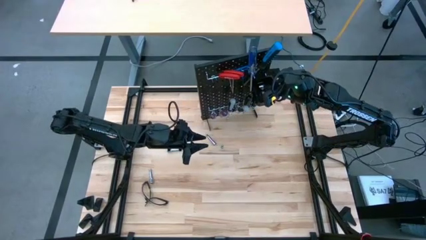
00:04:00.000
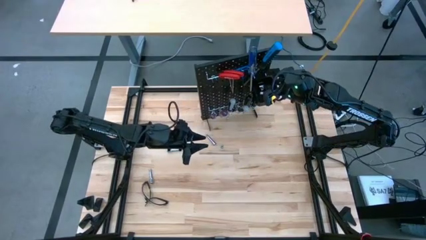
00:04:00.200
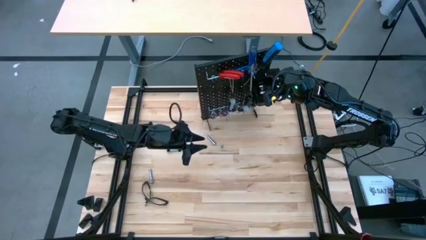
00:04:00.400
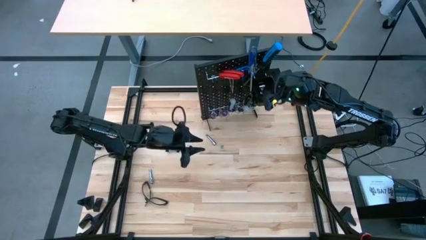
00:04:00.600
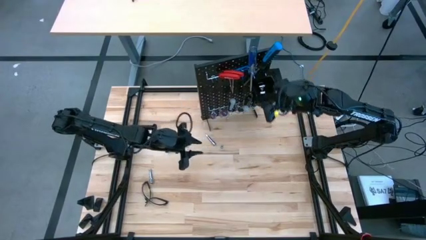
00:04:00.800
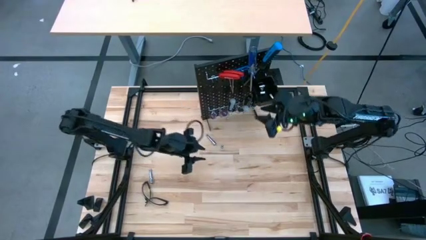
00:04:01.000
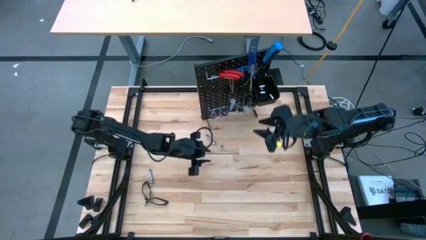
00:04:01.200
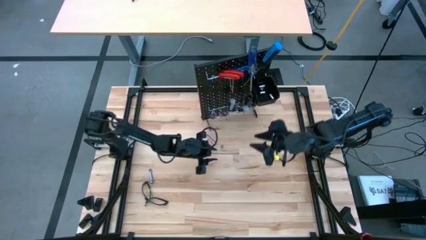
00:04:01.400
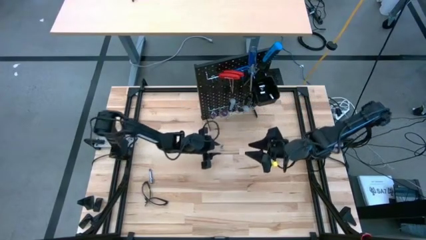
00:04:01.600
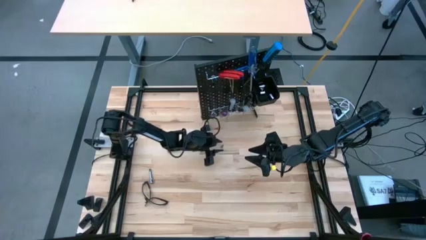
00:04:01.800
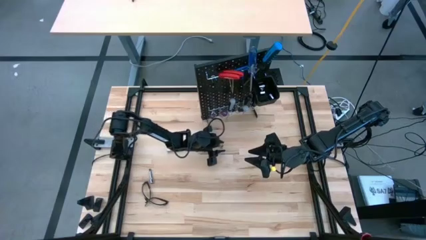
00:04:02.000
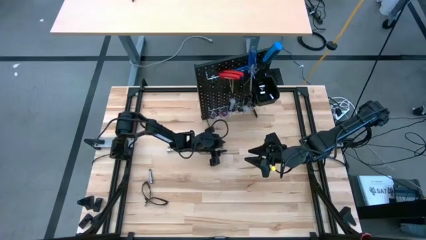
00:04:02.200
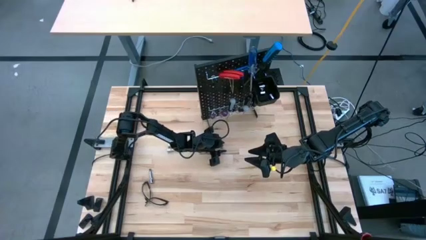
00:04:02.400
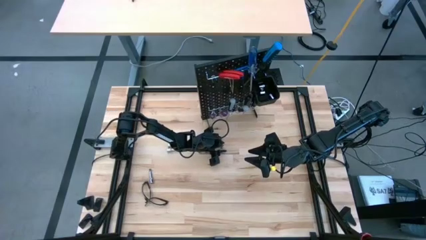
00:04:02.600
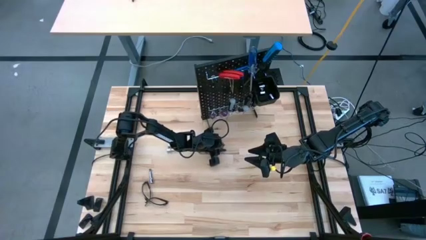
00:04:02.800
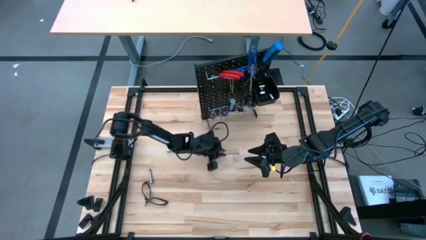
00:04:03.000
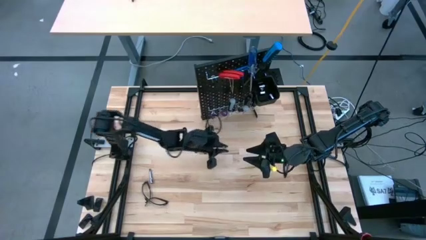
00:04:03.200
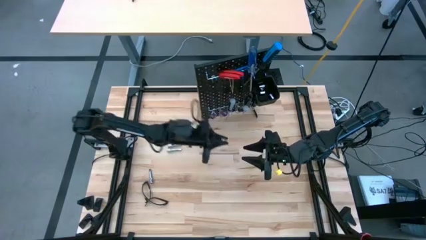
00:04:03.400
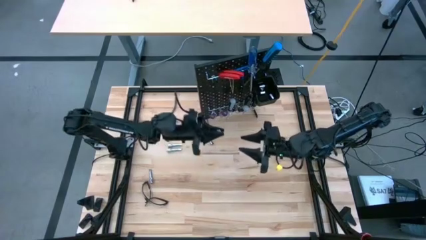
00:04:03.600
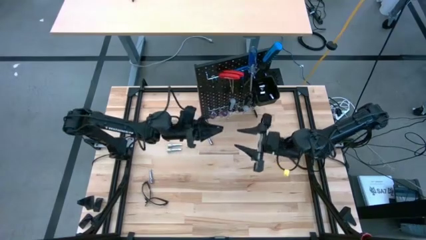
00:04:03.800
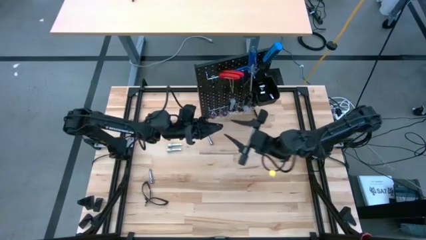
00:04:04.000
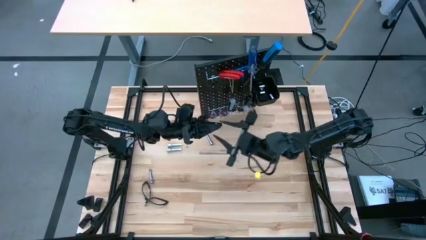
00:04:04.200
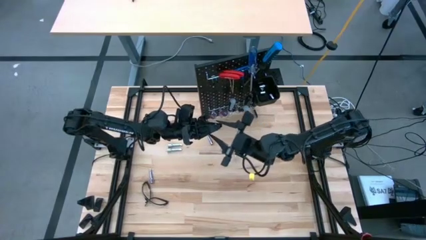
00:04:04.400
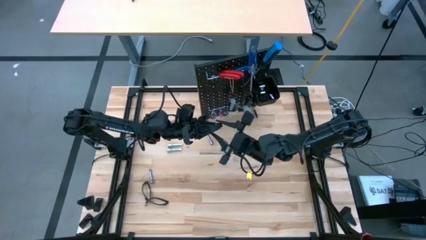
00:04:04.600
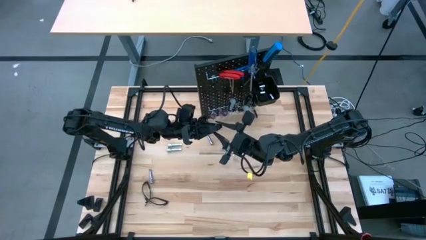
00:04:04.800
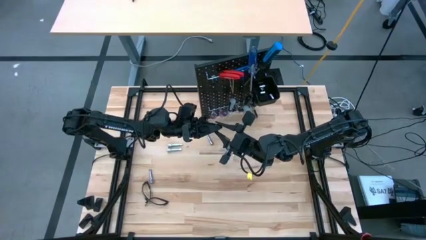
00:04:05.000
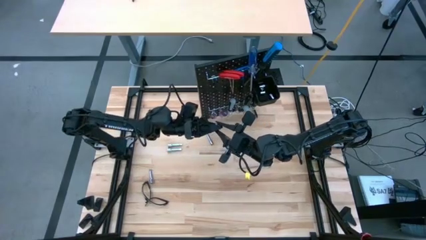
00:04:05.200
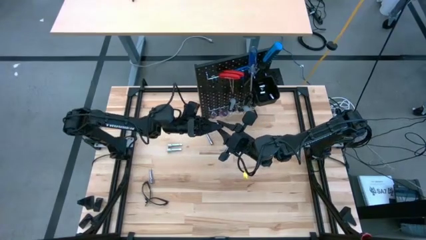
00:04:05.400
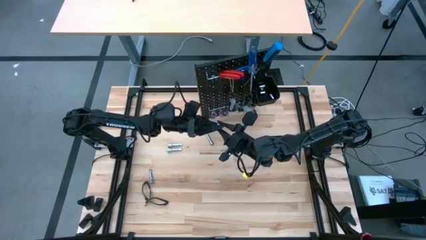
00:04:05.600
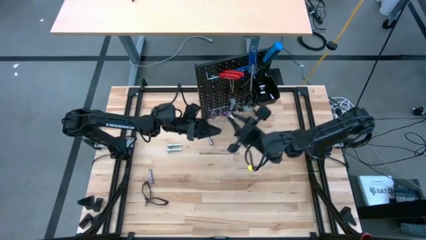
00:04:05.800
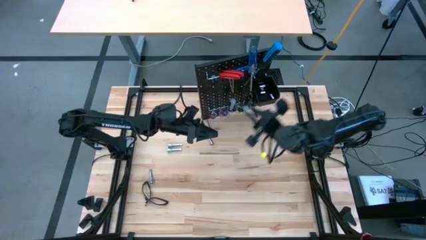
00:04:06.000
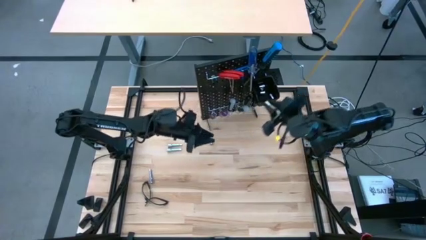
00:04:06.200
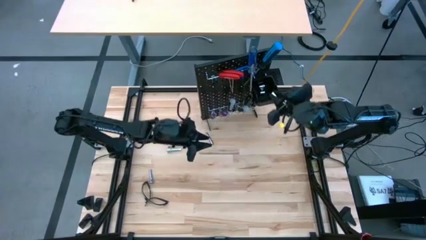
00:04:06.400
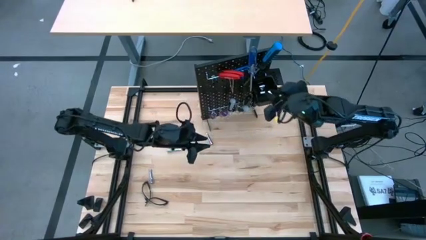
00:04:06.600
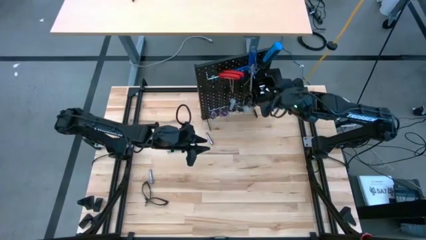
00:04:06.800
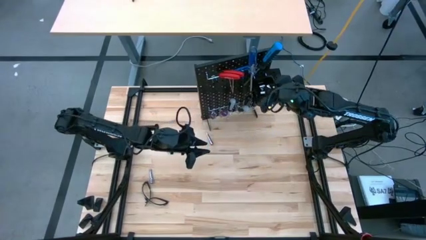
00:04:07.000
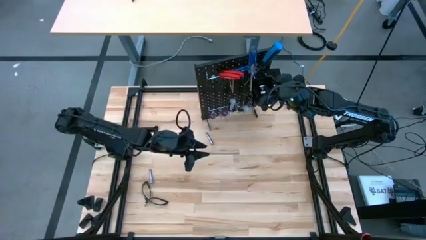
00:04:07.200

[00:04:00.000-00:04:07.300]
Task: Hang tools onto peg board
Put the silver socket into the black bin on the pegboard

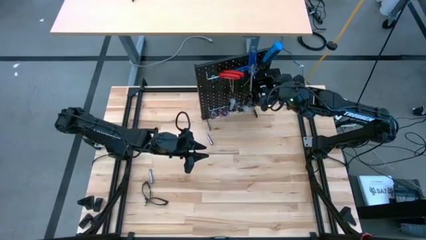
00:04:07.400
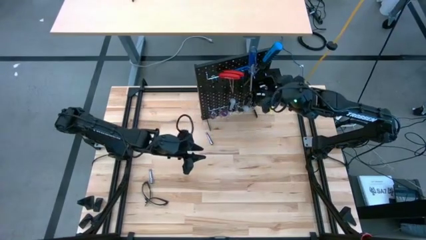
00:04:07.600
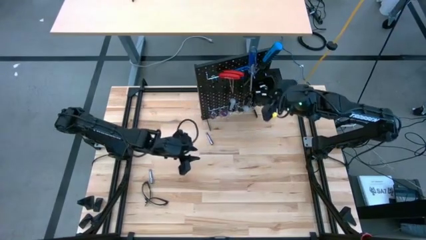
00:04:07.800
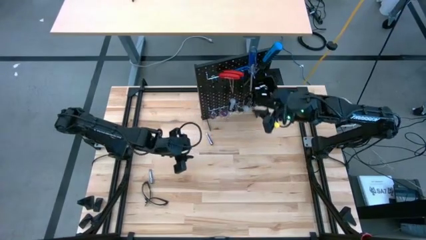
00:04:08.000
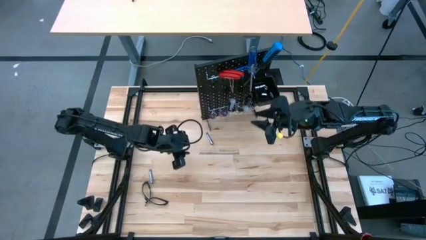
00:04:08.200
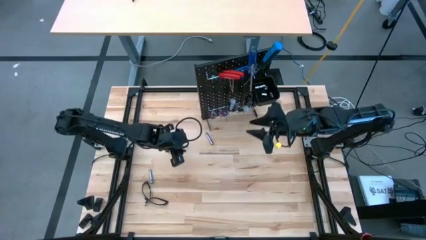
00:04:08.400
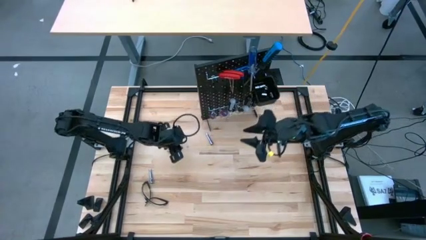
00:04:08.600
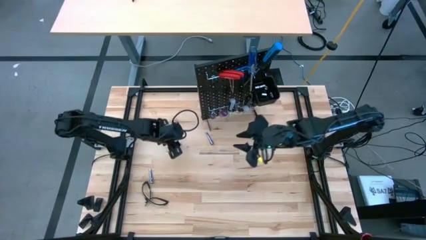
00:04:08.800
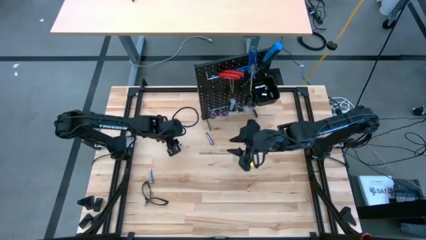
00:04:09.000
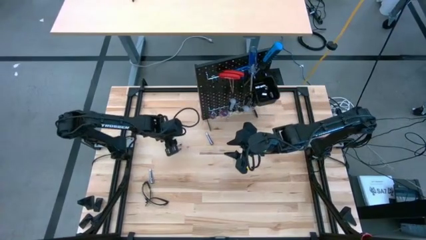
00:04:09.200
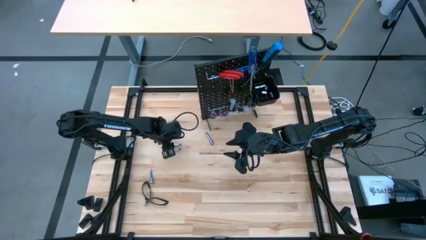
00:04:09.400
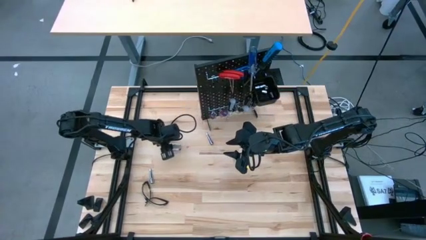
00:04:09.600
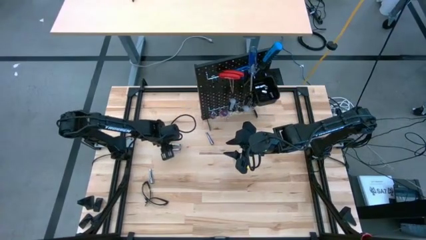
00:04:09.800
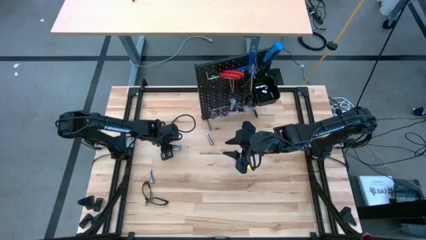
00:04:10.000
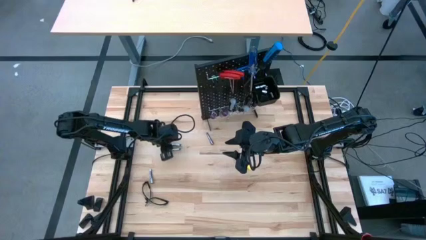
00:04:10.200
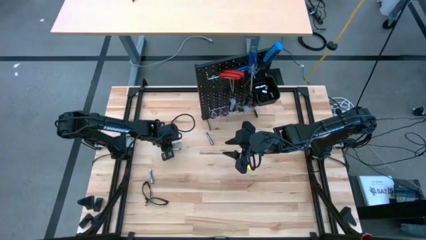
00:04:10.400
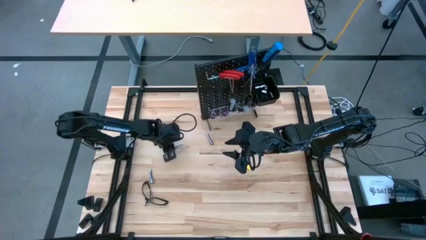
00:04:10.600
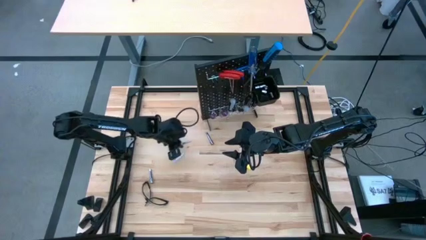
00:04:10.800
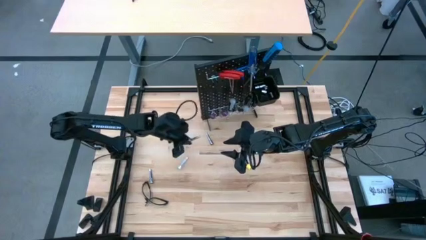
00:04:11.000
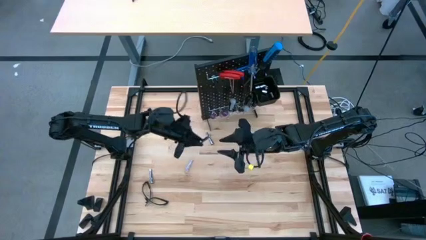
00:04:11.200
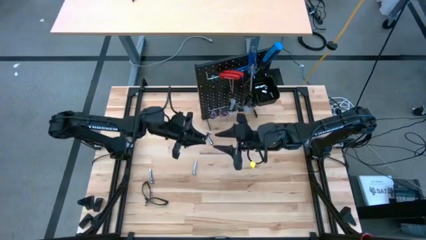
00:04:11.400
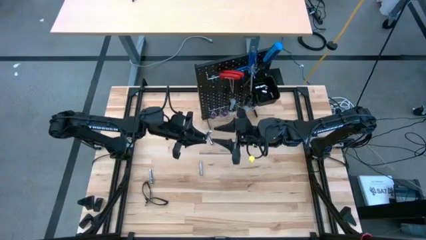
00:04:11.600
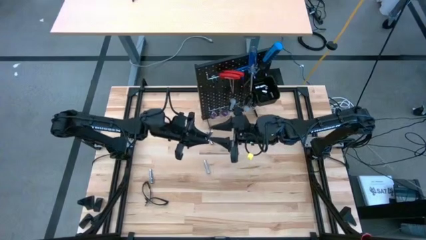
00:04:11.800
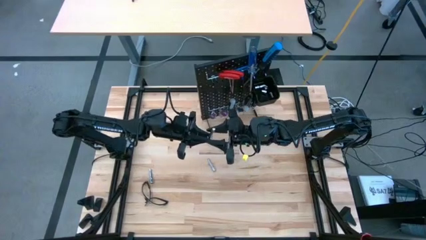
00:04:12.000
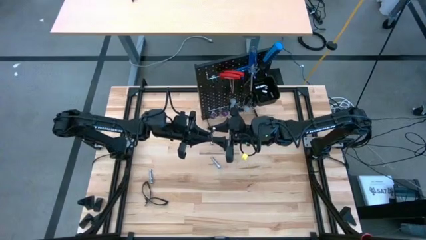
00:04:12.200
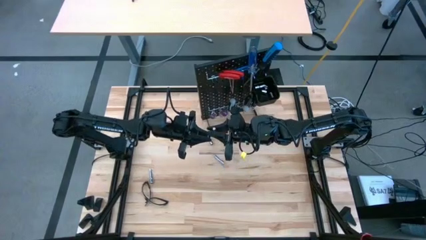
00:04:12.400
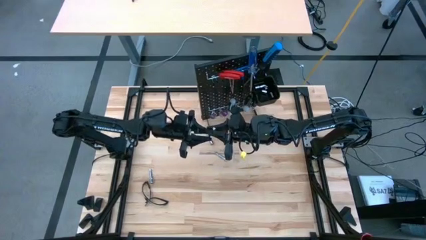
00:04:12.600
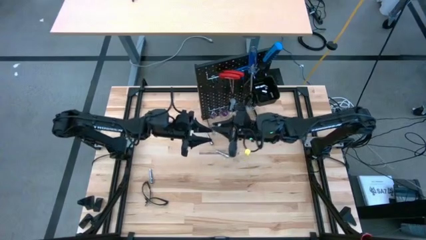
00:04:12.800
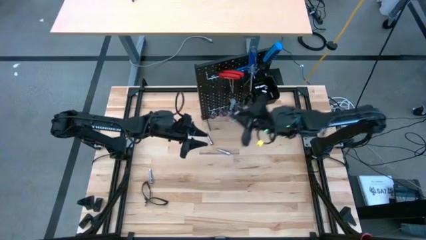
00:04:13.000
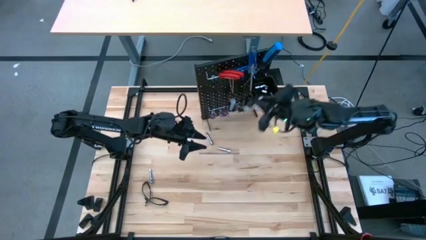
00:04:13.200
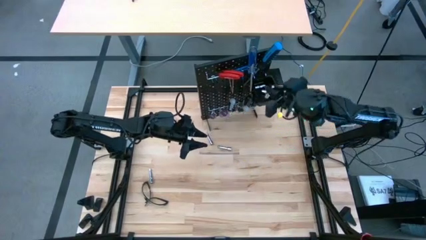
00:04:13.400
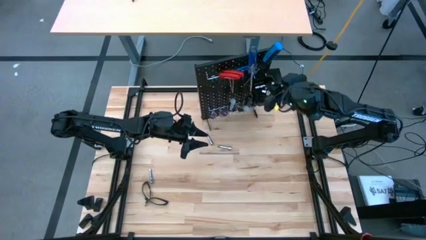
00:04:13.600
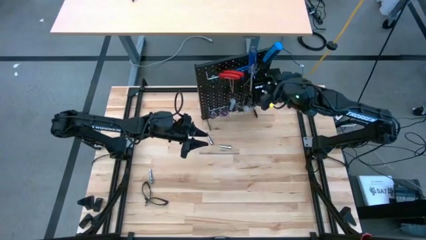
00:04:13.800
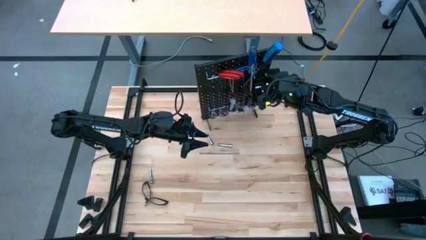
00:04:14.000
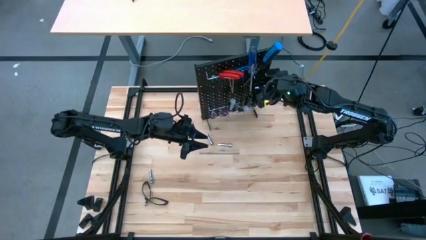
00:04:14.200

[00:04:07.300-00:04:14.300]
Put the silver extension bar into the black bin on the pegboard

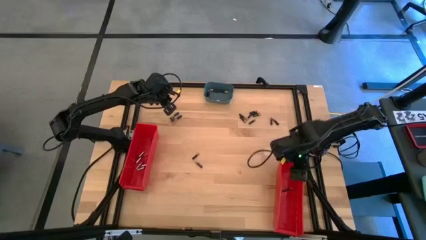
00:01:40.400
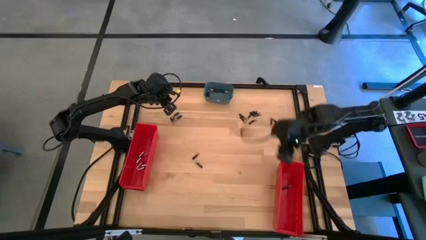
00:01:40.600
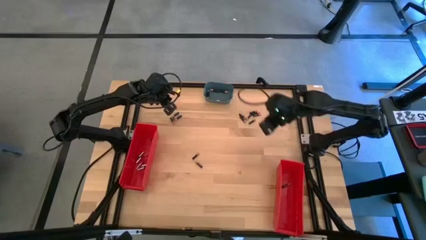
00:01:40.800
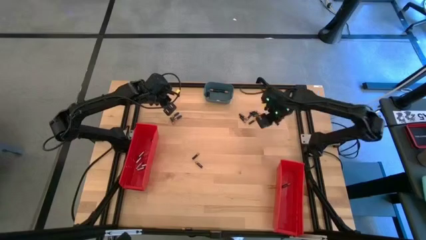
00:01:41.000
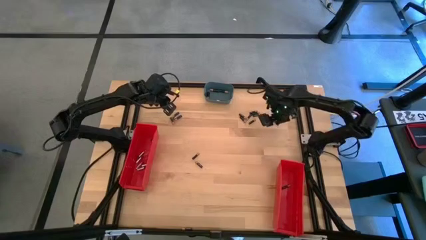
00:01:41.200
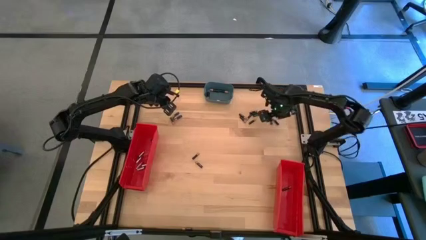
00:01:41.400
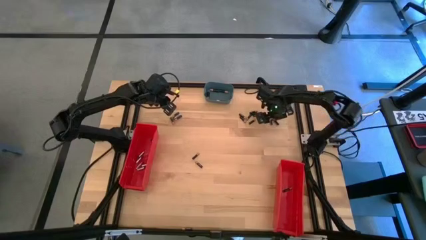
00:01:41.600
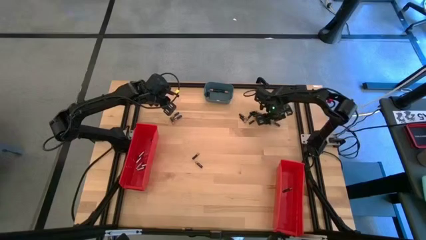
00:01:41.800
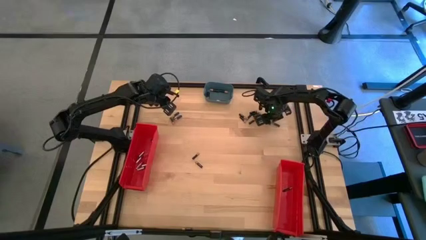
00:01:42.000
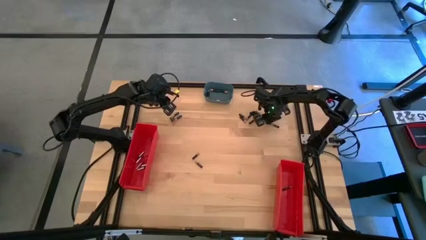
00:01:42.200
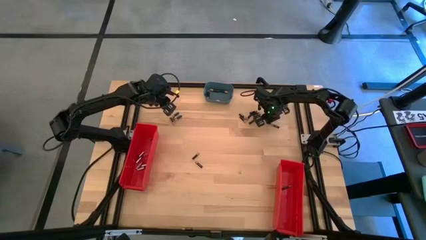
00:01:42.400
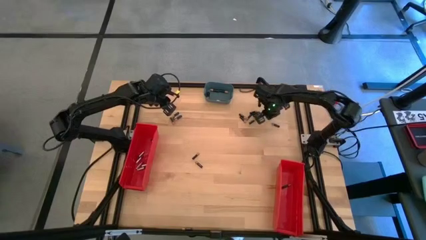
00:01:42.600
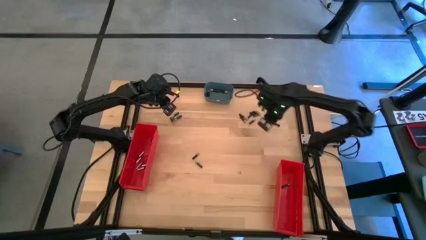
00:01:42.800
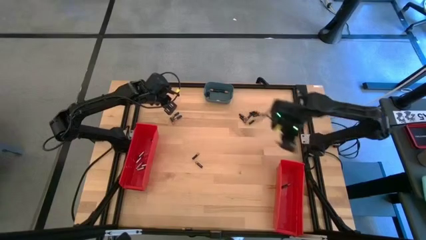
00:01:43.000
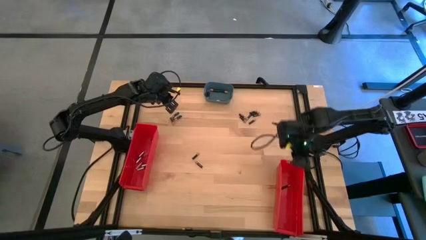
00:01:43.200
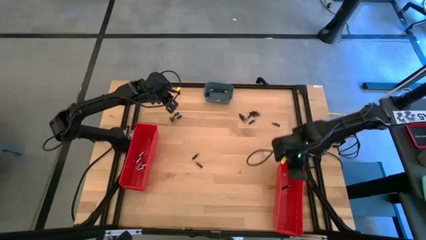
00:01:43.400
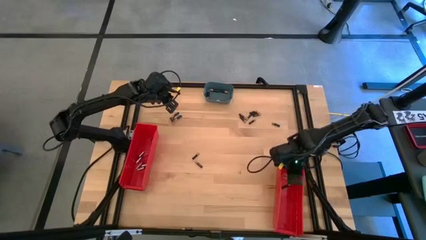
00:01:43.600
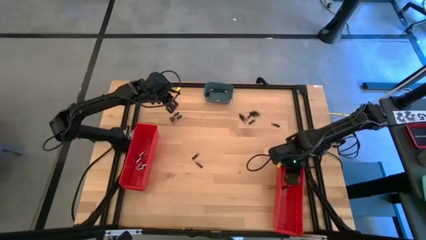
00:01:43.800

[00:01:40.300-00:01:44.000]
Task: Sort batteries
Put the small brown battery into the right red bin
